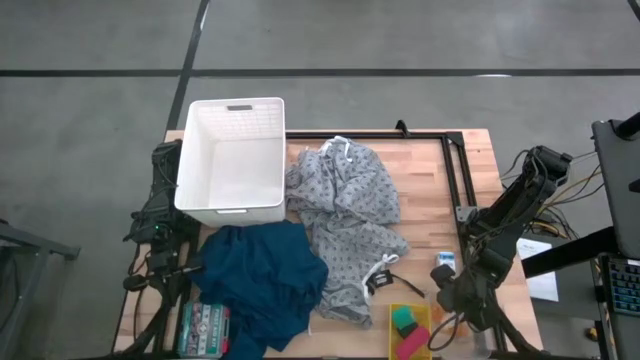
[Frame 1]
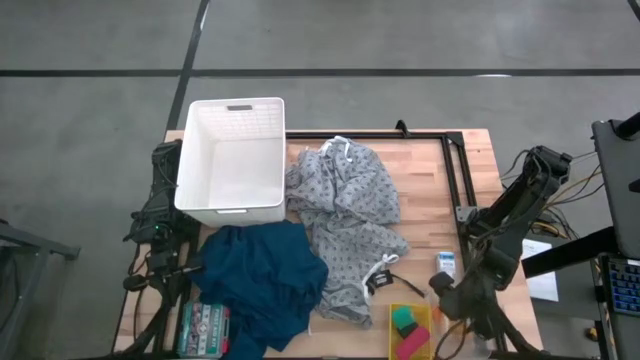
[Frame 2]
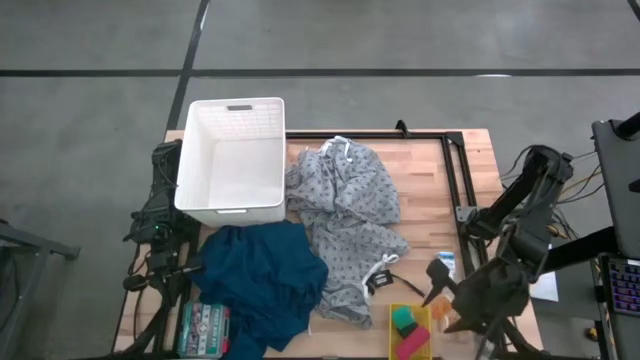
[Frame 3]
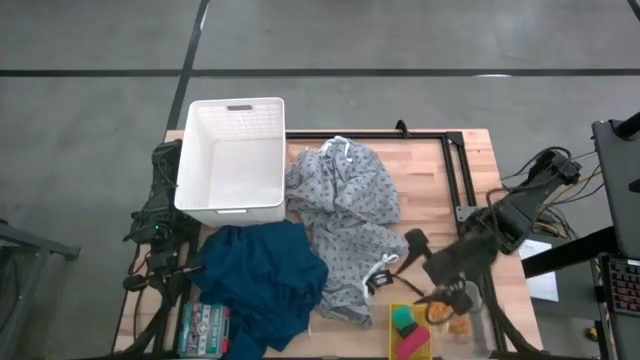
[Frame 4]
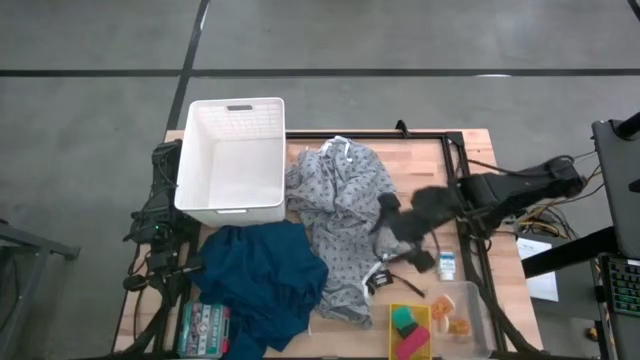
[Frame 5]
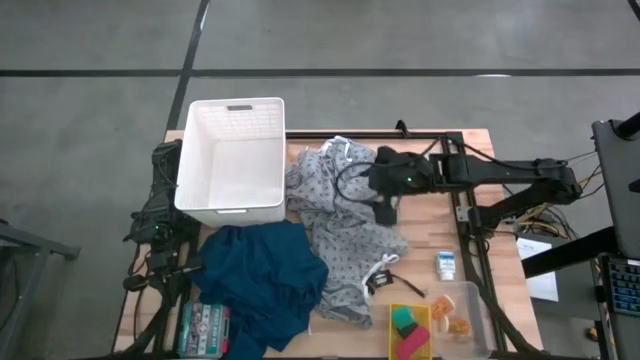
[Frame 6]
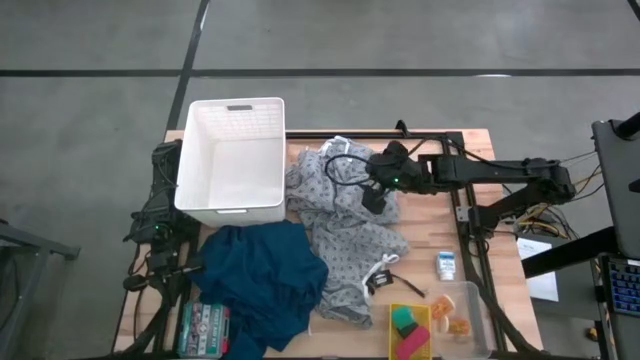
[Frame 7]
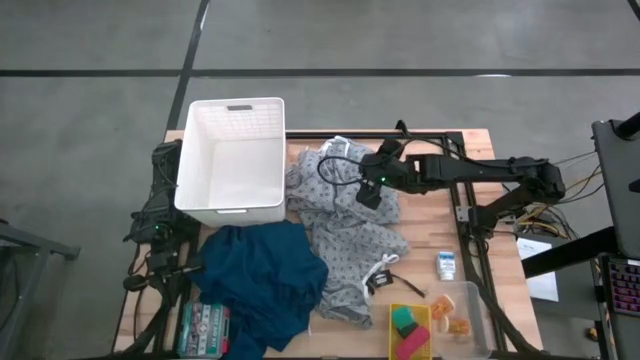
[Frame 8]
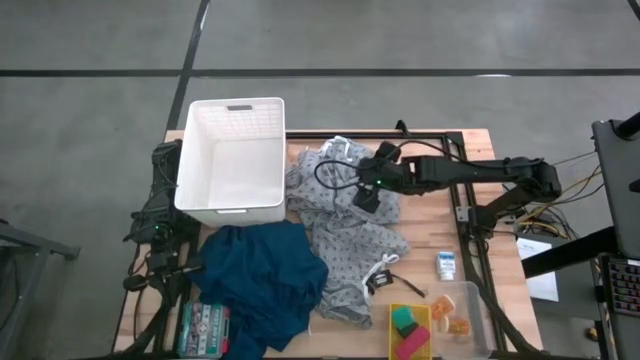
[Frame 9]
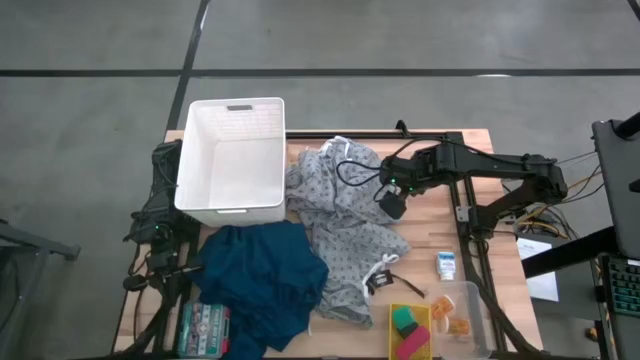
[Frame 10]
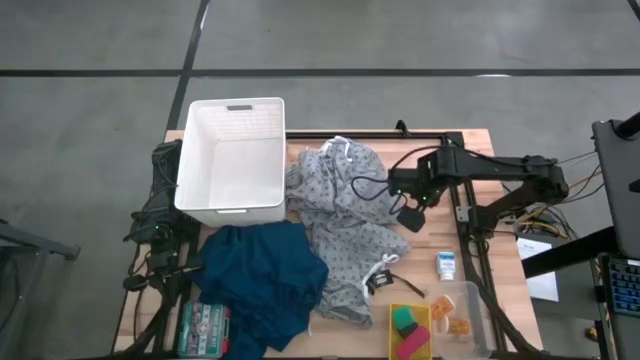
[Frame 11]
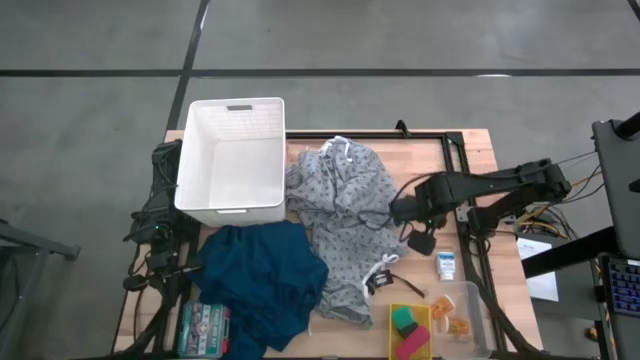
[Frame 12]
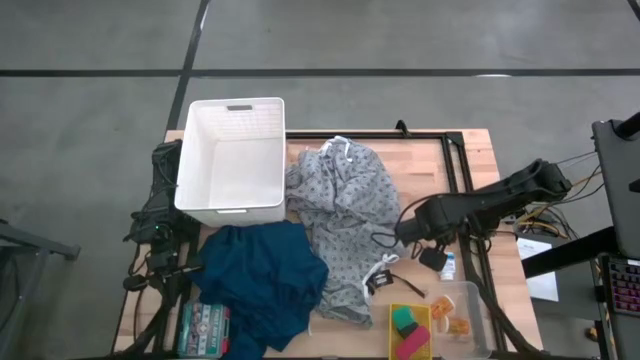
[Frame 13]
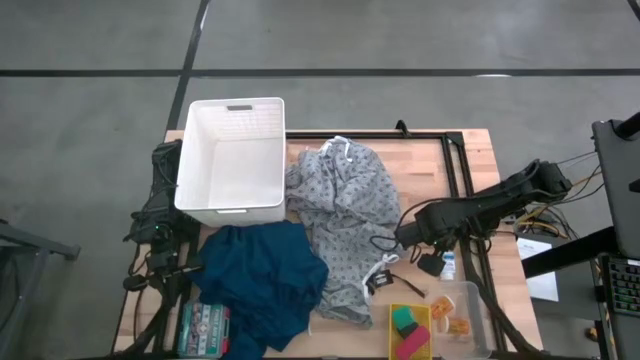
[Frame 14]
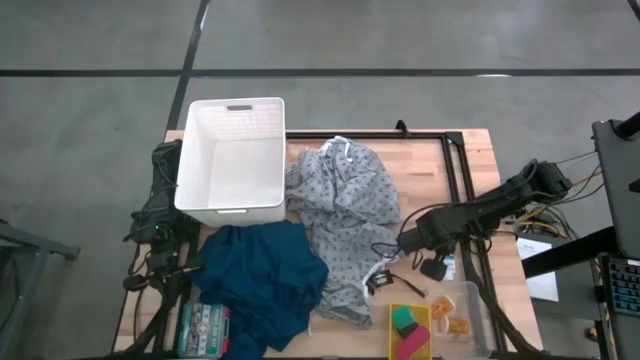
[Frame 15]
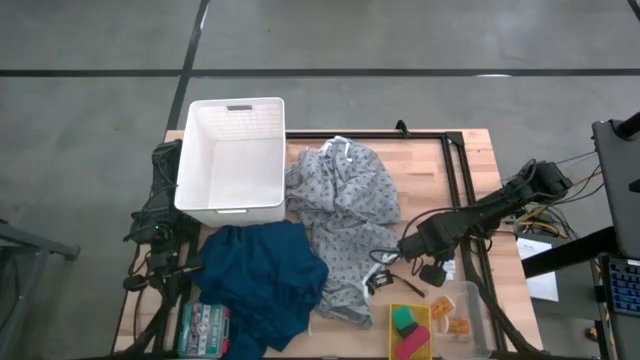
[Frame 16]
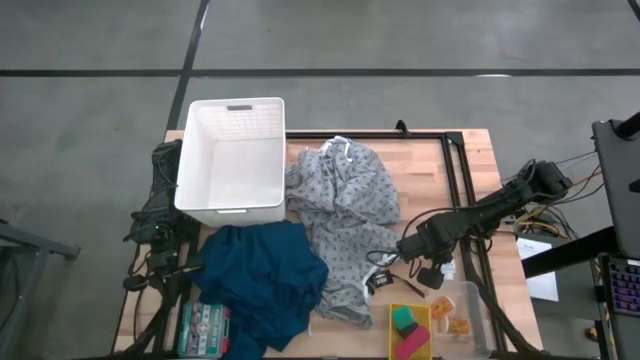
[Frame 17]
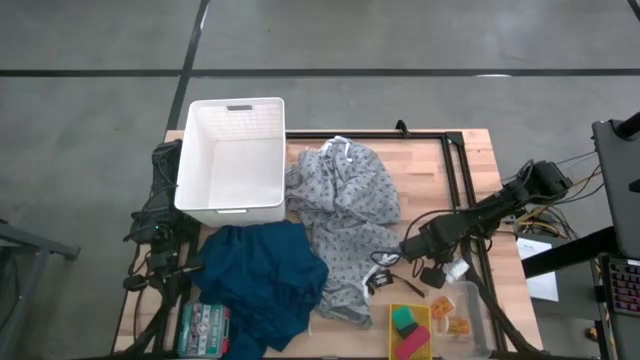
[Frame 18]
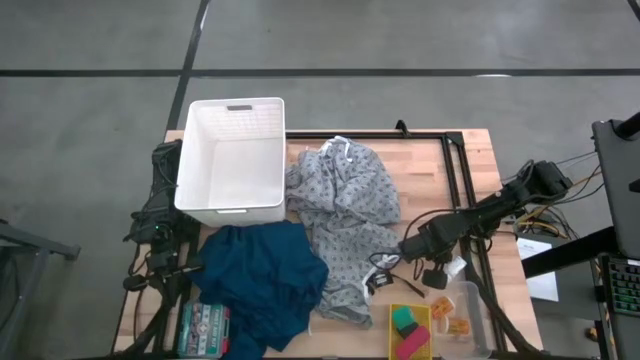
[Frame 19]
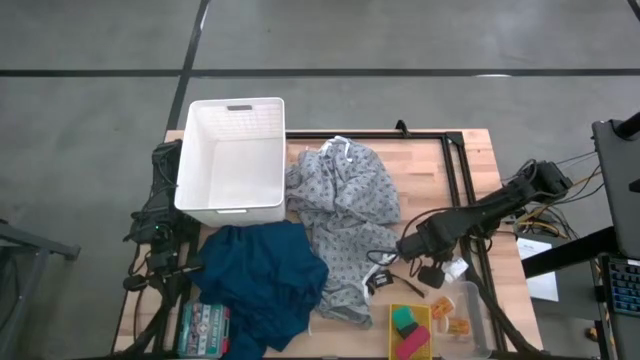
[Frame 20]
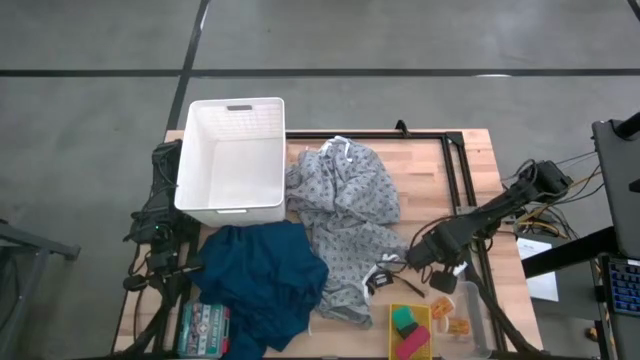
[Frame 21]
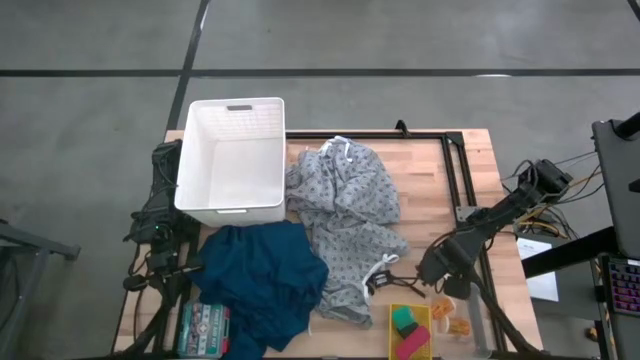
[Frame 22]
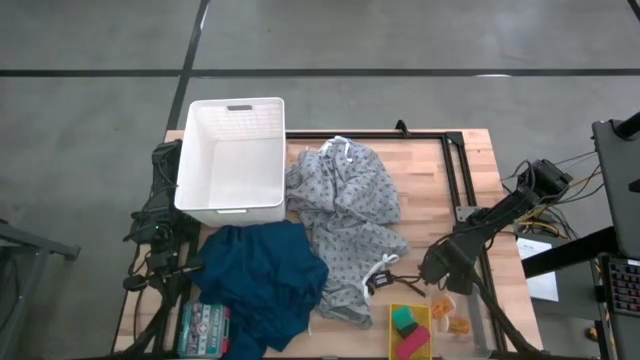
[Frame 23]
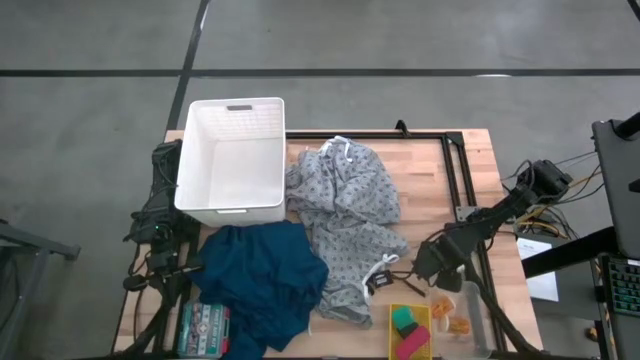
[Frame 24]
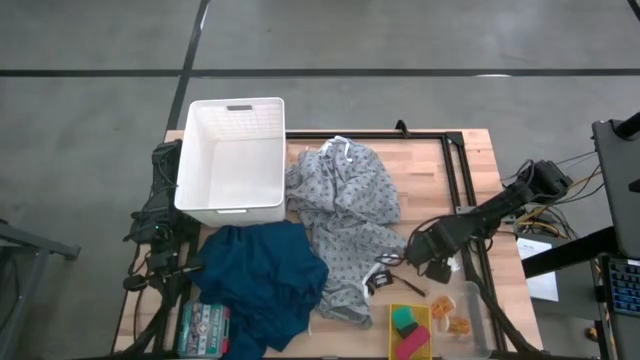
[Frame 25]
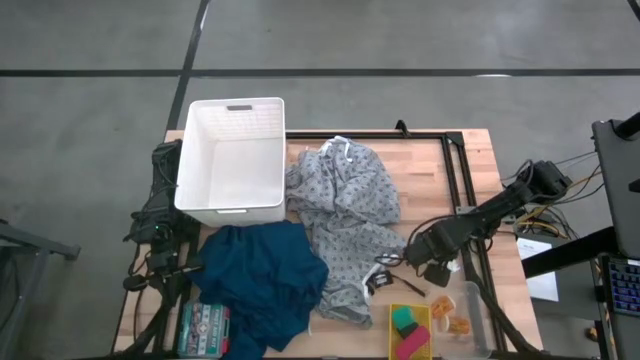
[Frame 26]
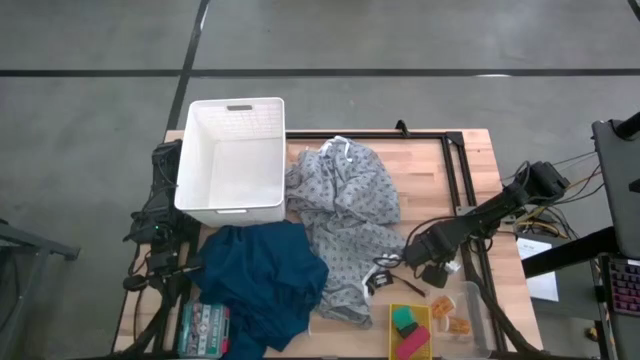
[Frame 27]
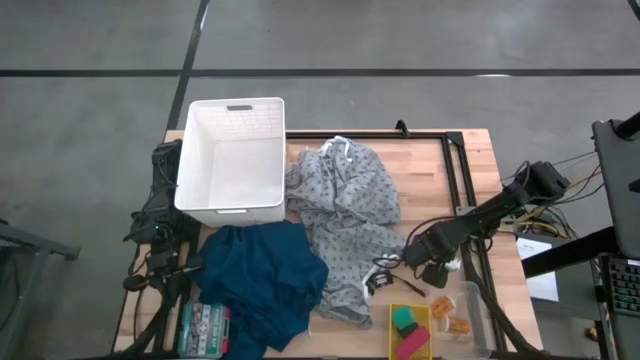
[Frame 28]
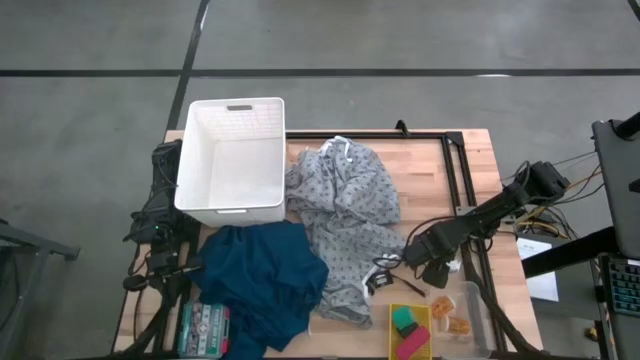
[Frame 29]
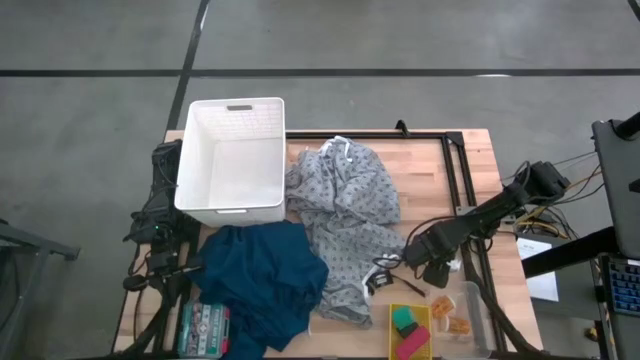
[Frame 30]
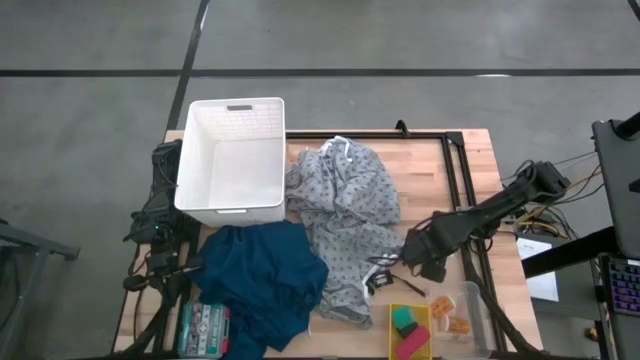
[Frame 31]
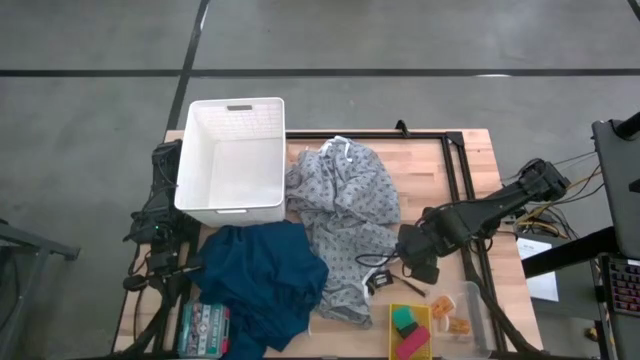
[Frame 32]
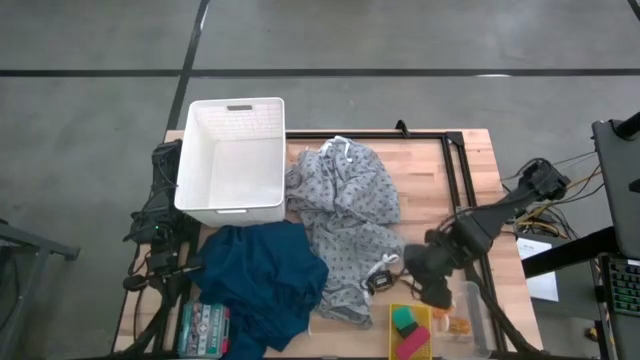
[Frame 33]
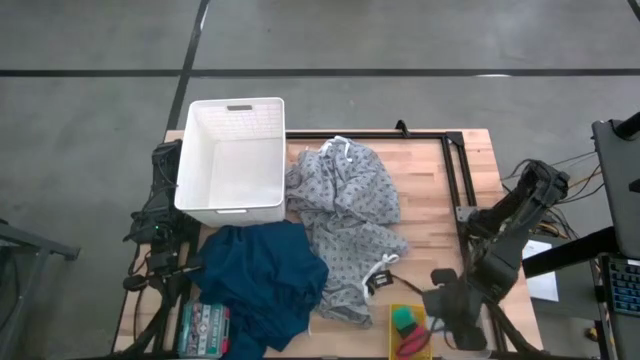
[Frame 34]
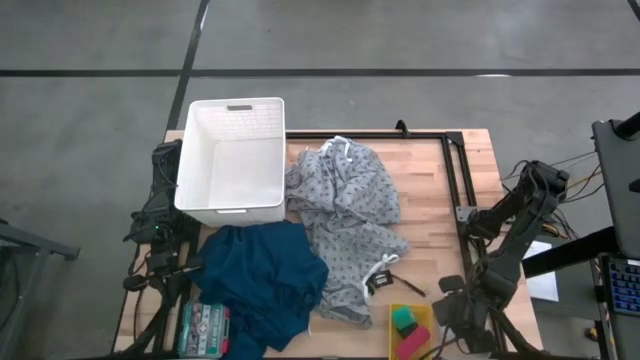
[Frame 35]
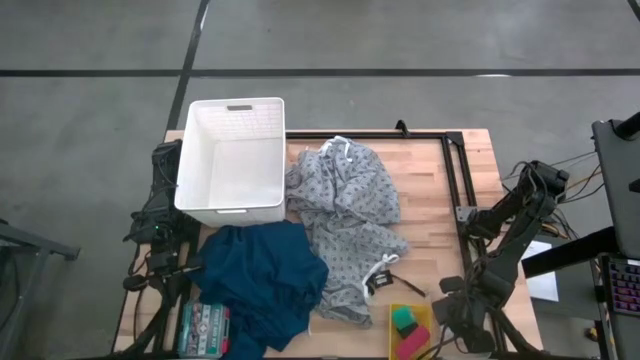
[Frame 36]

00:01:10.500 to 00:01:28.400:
Task: Pick & Place Medicine items
Put the white blue pill bottle into the transparent bin

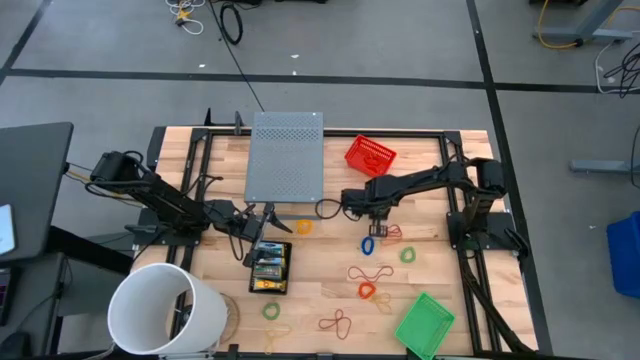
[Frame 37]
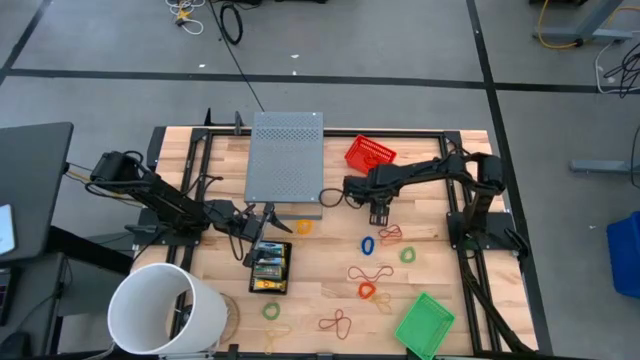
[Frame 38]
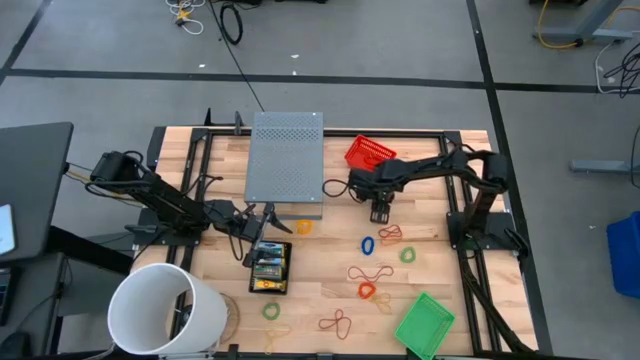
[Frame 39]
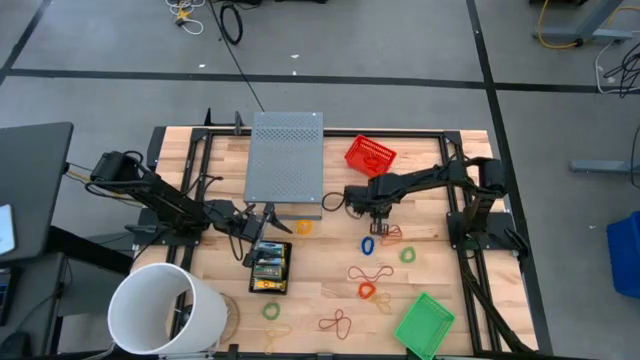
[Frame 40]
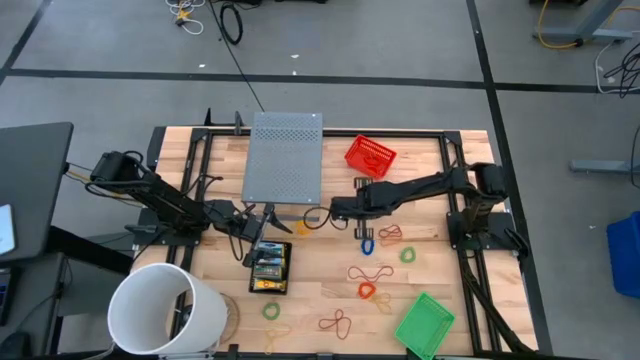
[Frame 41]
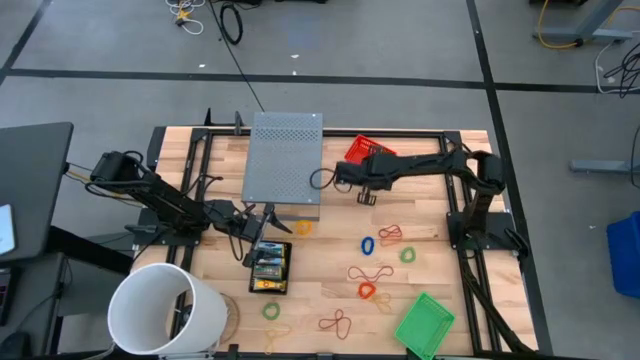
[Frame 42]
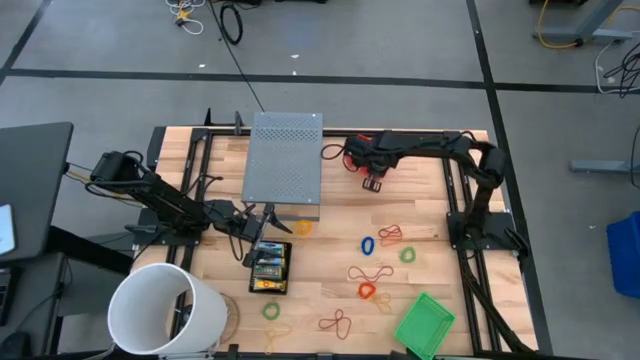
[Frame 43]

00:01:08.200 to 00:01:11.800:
Task: Pick & Place Office Desk Supplies
Put the top yellow spring keychain into the red basket
